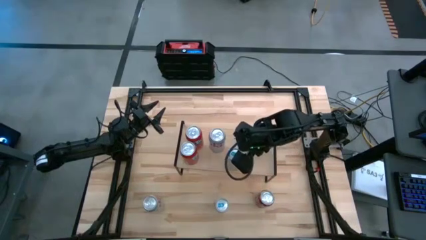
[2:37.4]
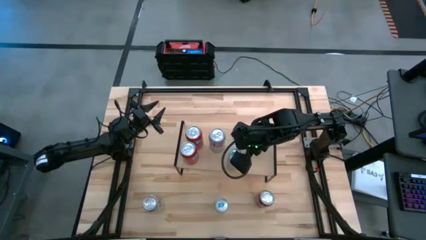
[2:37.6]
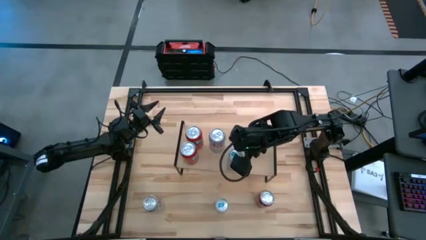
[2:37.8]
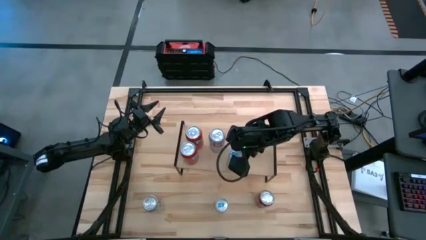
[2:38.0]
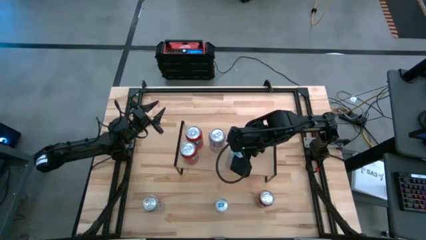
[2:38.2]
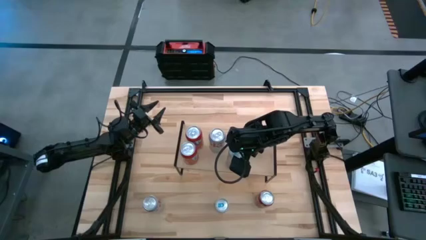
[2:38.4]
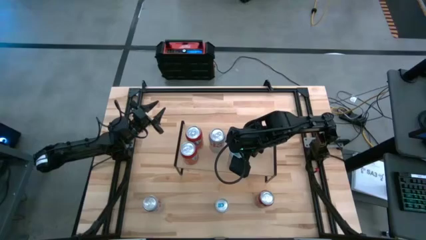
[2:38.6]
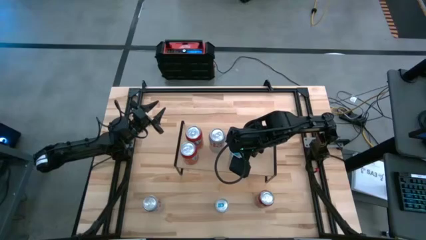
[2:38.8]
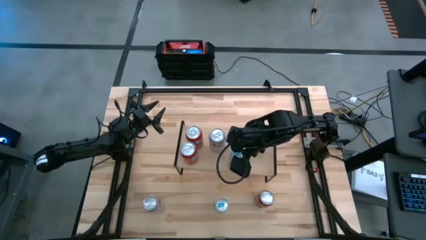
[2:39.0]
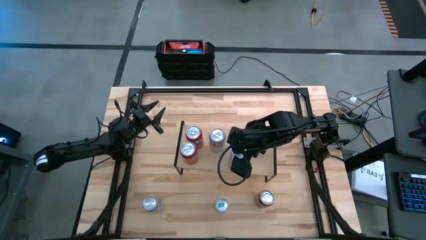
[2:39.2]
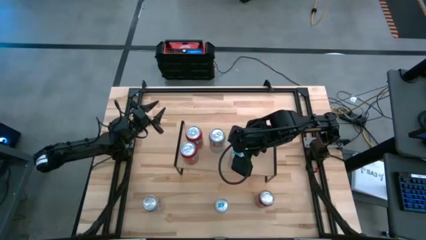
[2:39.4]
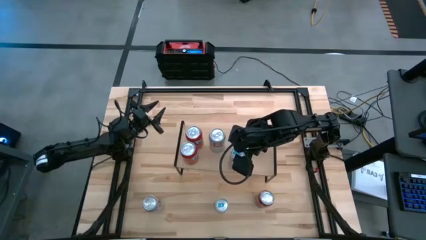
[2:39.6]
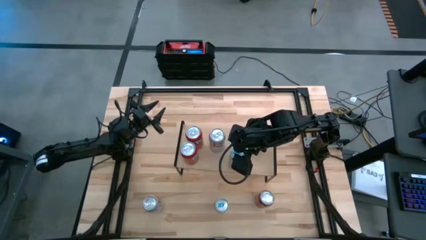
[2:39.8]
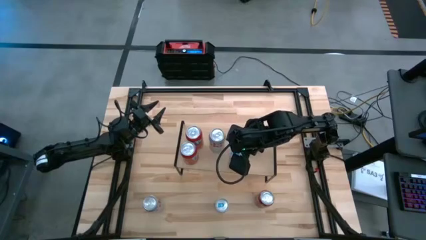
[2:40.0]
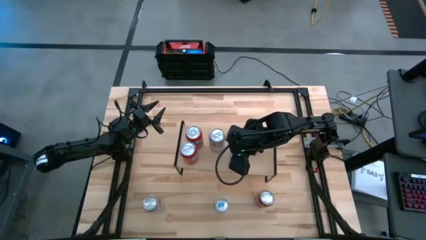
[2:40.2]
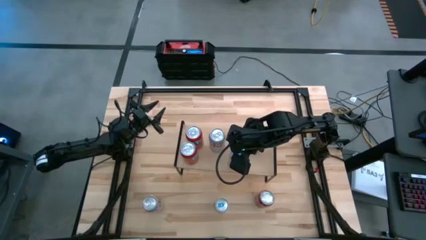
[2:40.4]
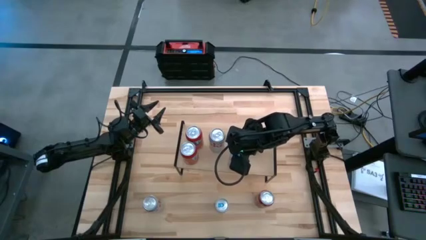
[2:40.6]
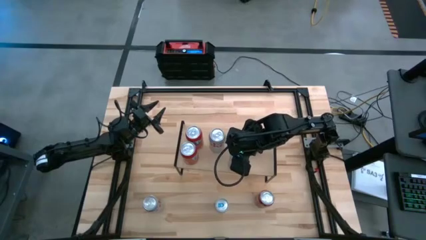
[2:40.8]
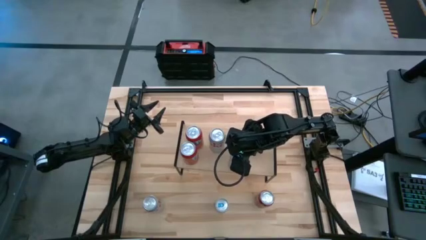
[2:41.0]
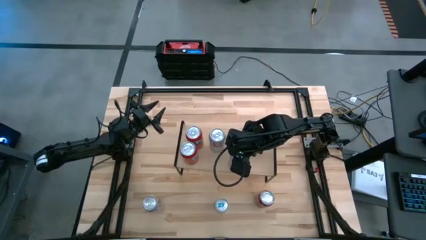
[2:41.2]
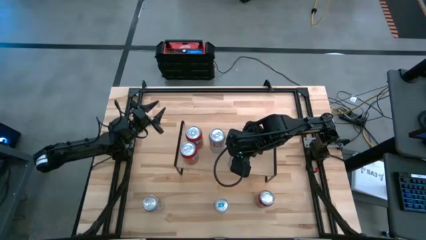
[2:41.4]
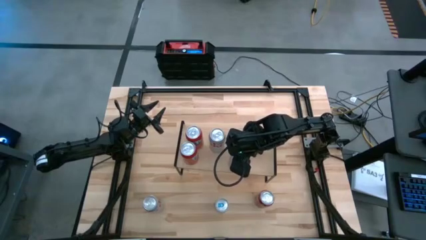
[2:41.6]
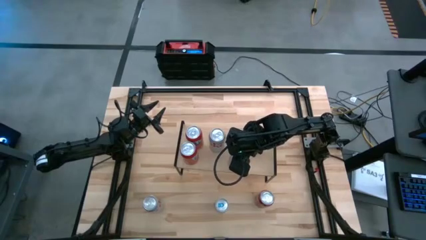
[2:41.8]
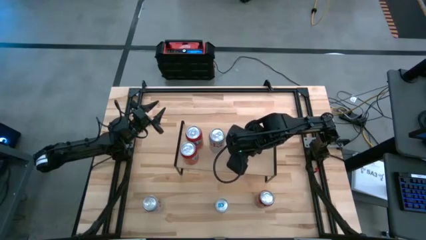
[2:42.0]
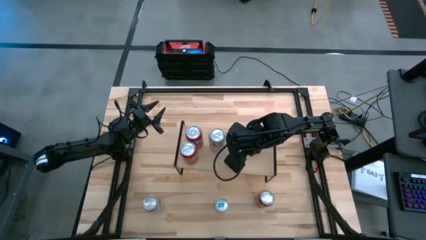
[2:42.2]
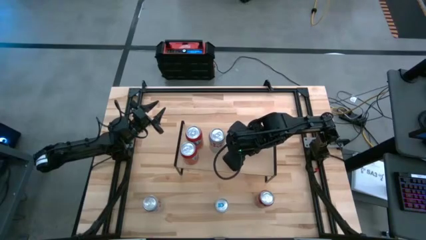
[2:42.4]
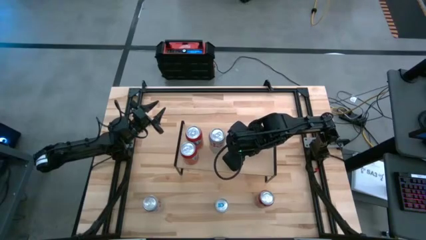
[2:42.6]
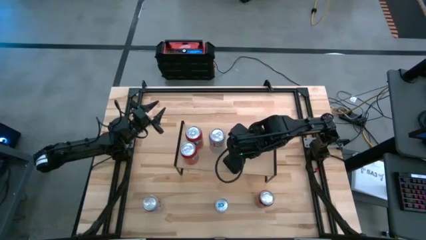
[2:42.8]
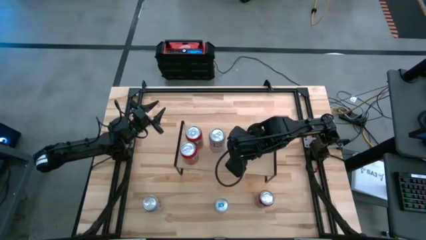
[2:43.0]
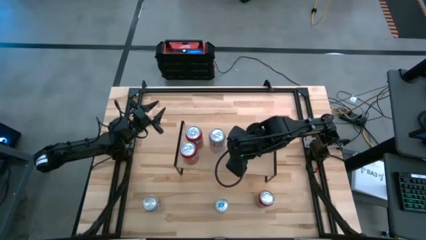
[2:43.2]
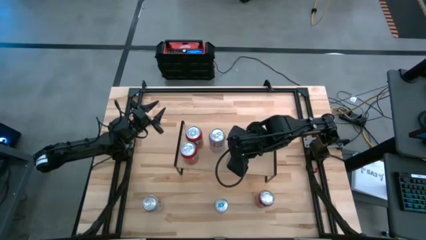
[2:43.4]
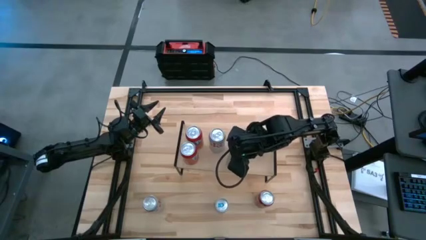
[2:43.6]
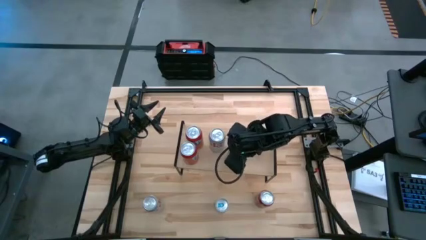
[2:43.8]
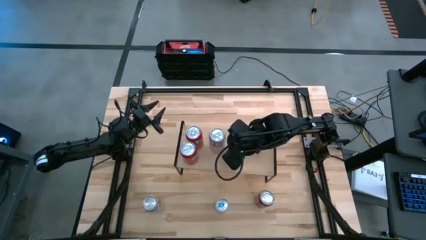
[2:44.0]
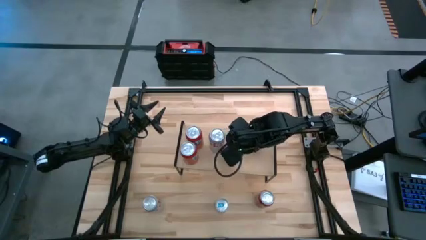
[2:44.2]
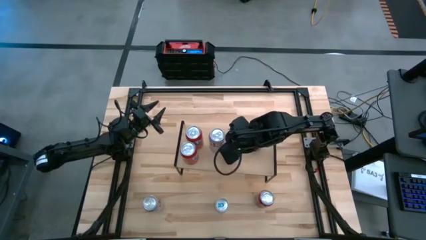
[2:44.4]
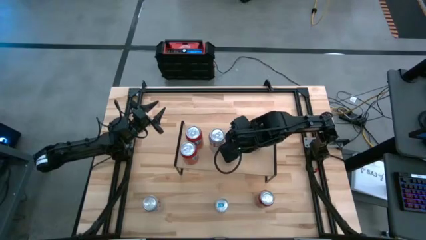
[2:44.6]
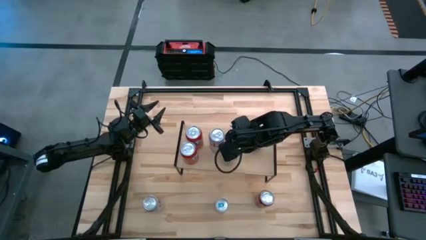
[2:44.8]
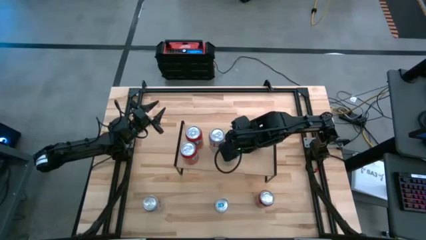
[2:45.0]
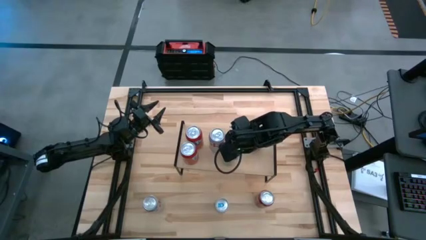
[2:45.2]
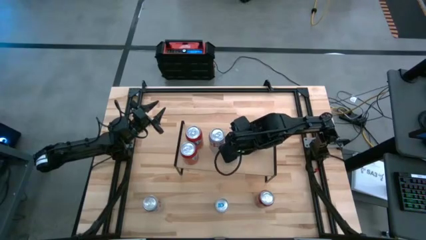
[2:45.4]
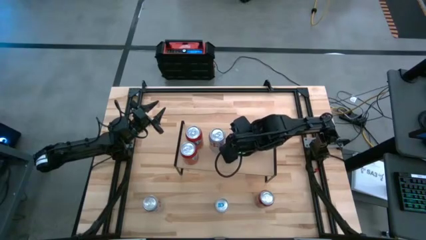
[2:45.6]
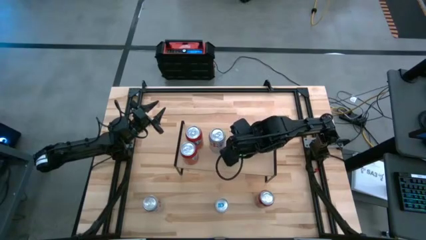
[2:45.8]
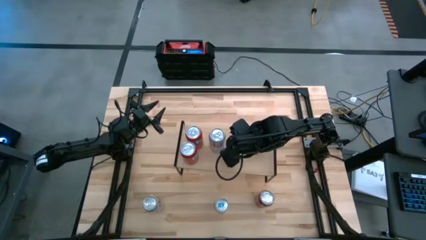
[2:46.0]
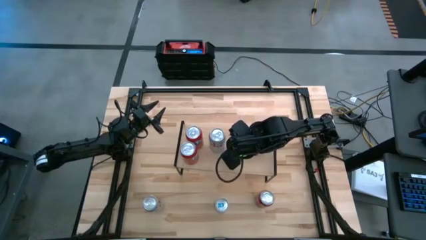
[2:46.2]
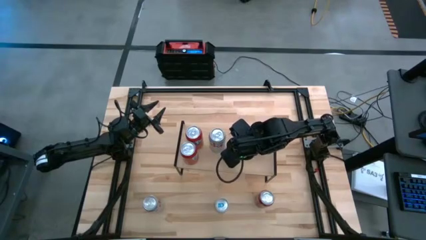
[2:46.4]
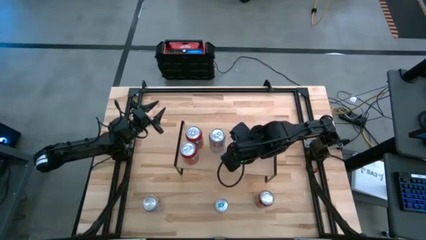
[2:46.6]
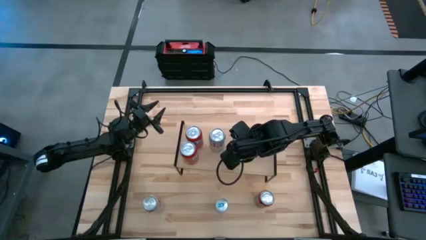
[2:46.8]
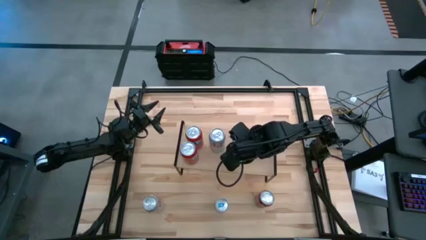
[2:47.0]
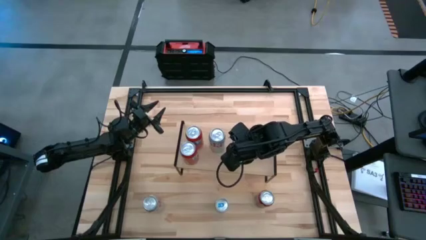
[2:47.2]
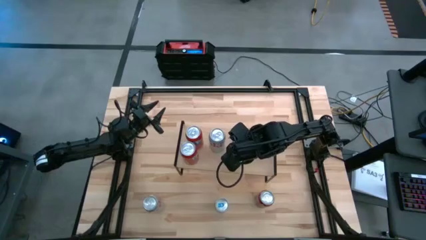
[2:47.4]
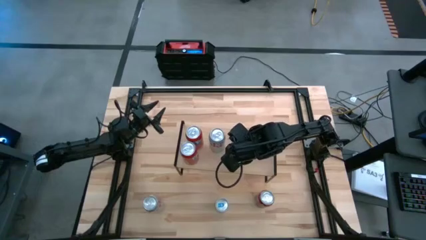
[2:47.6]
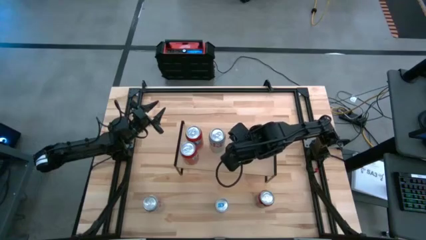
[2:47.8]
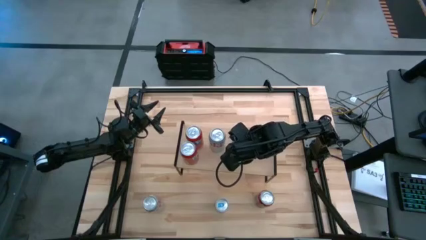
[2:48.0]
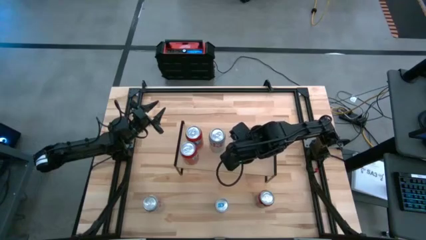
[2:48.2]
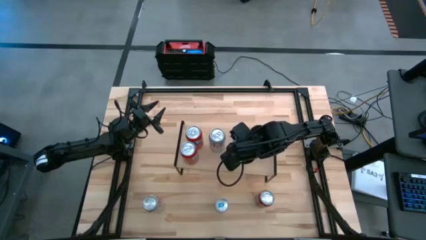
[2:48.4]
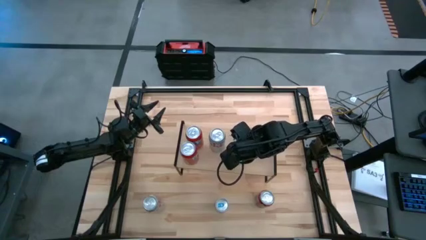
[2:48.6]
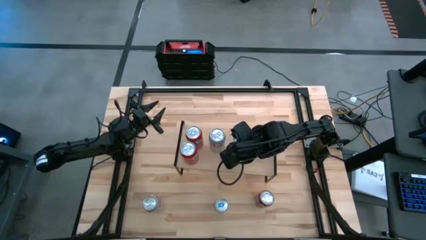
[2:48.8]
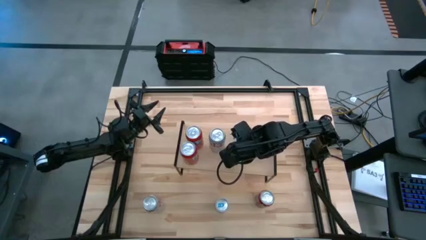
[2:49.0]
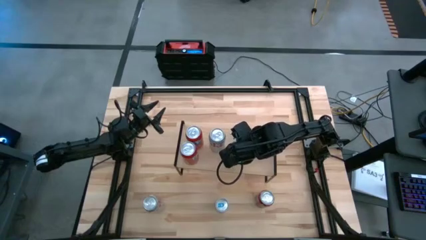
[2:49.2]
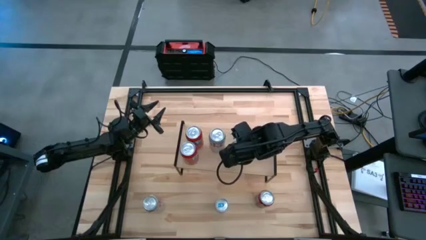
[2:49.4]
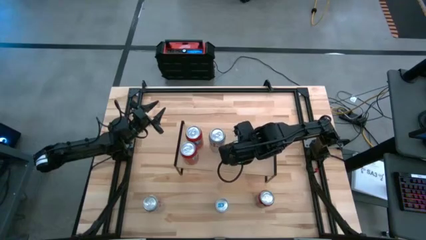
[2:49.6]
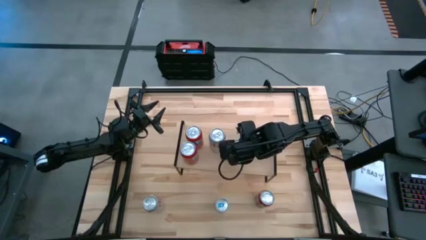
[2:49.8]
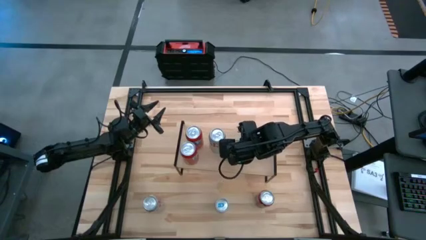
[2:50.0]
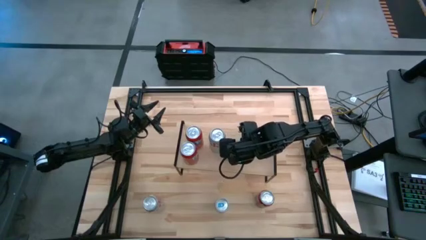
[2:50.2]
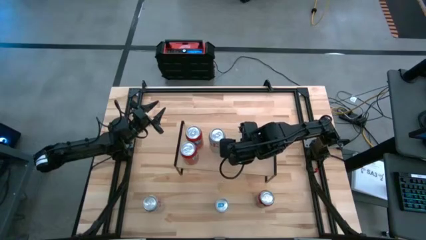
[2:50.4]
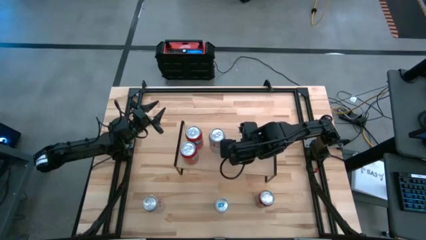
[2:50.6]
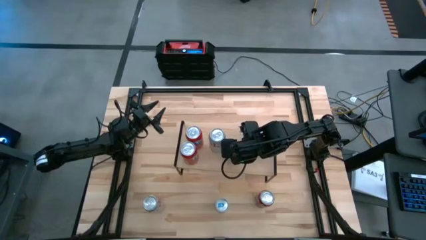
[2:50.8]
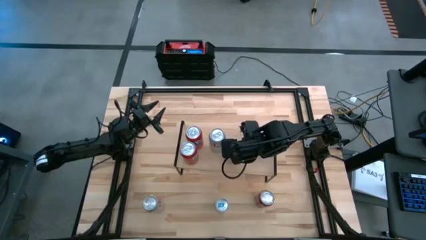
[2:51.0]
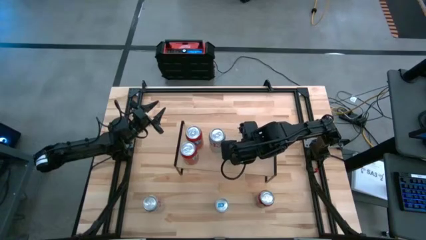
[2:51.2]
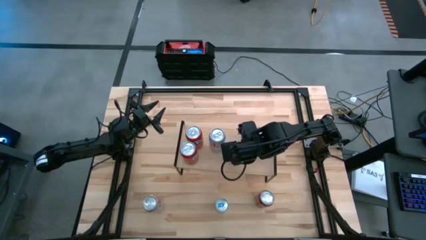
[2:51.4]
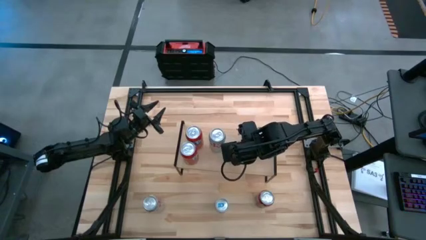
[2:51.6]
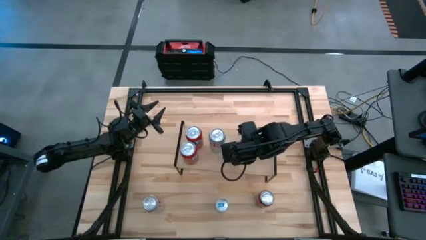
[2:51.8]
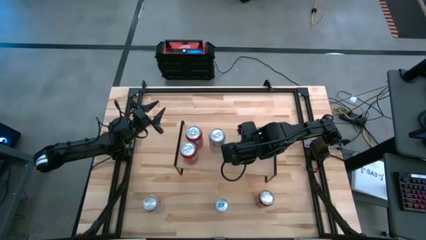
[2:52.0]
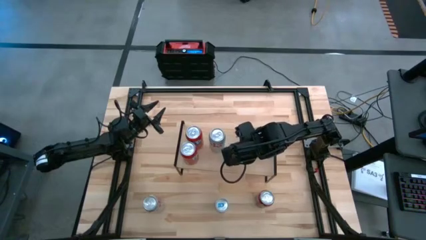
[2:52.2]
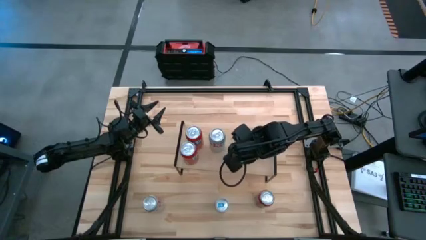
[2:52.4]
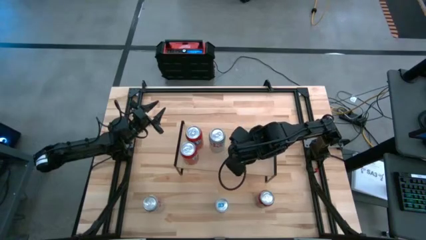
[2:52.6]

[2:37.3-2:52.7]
Task: Place canned beverage on shelf
Put the right blue soda can on the shelf

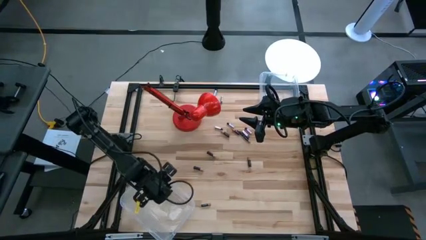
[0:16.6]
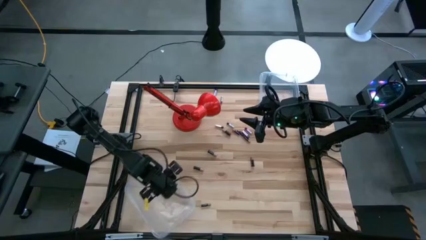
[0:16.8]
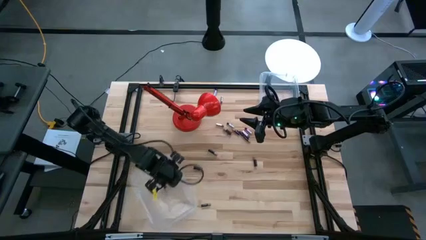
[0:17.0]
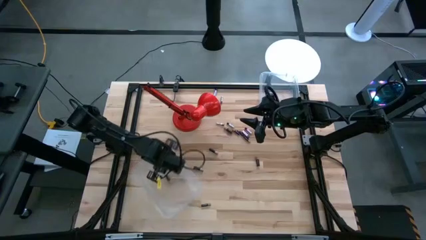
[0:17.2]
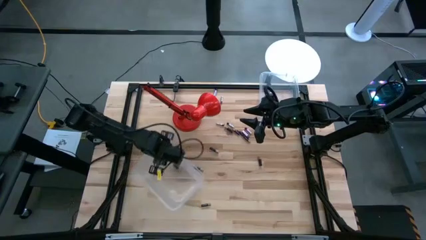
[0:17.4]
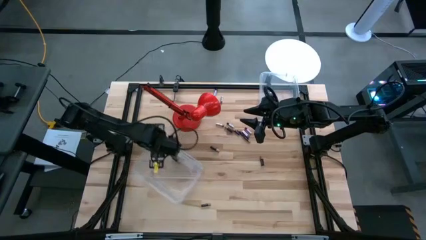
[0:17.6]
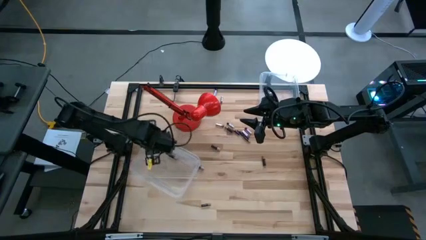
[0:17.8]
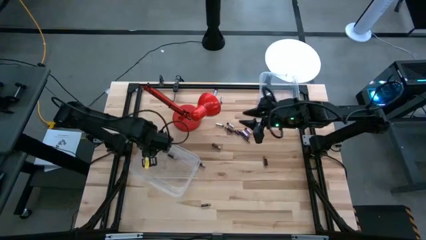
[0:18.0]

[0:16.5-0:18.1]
Task: Sort batteries
Move the bottom transparent bin to the middle left of the table

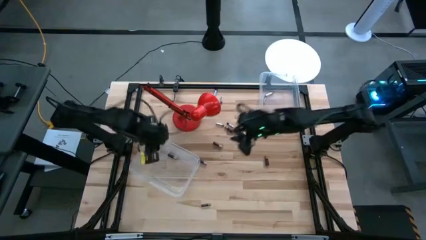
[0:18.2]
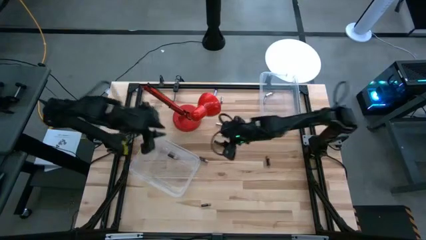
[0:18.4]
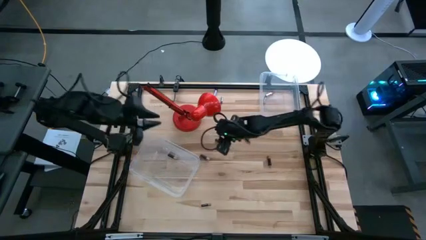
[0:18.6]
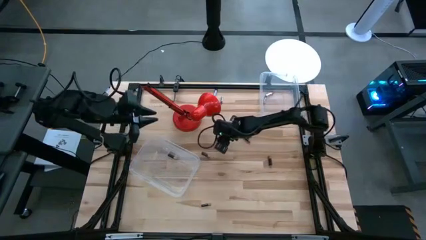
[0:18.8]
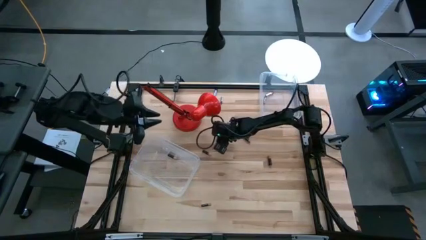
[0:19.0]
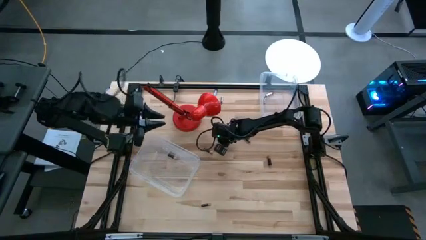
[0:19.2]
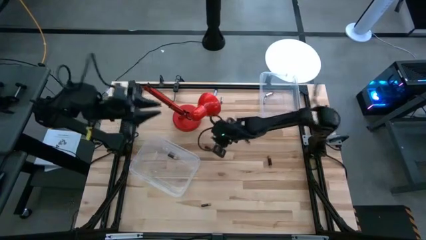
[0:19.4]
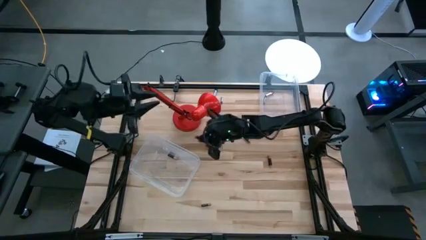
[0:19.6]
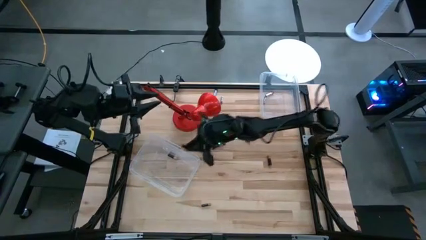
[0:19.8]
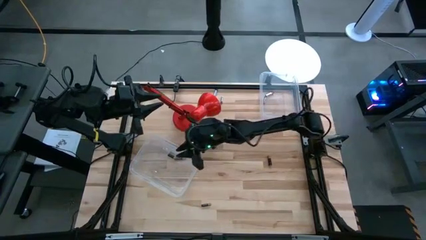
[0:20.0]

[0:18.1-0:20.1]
Put the black battery into the bottom transparent bin
